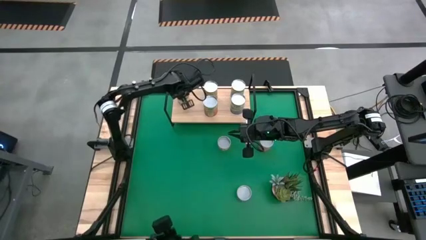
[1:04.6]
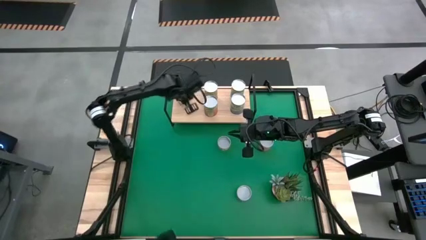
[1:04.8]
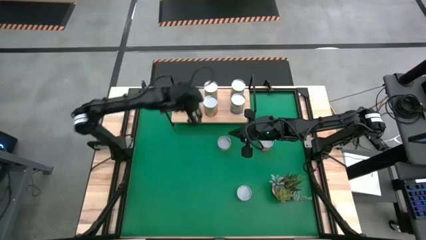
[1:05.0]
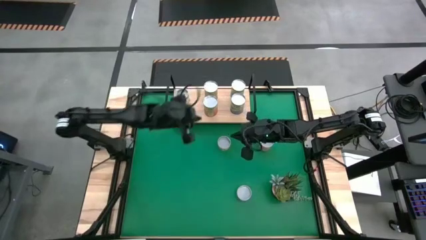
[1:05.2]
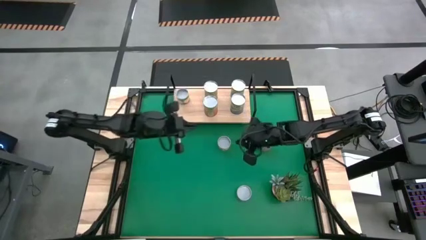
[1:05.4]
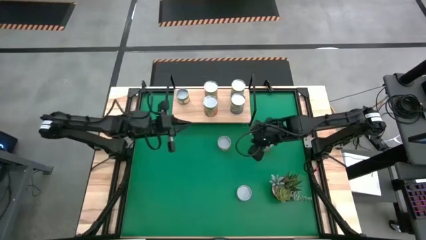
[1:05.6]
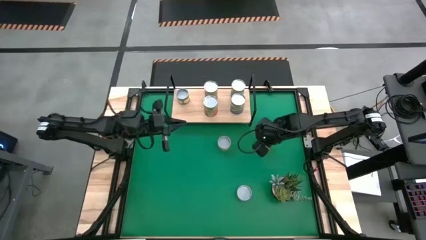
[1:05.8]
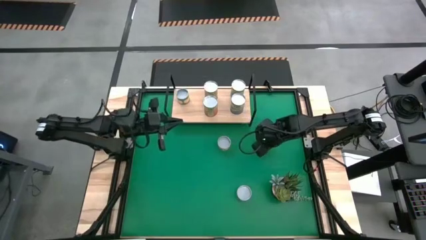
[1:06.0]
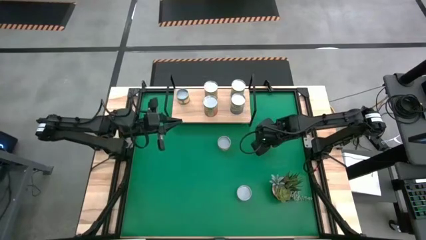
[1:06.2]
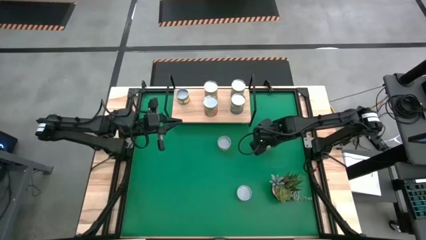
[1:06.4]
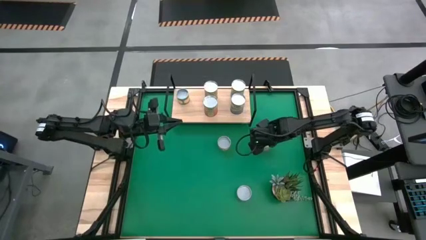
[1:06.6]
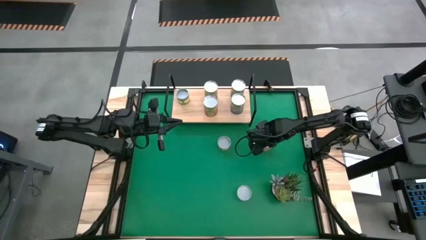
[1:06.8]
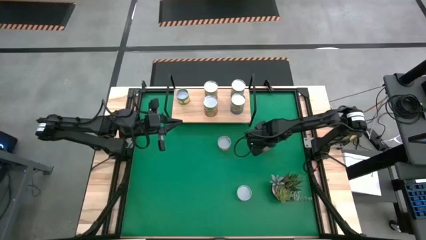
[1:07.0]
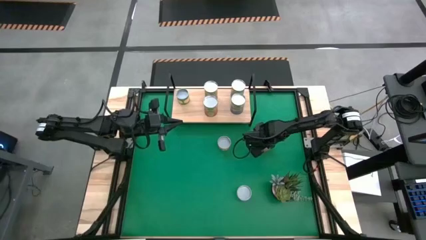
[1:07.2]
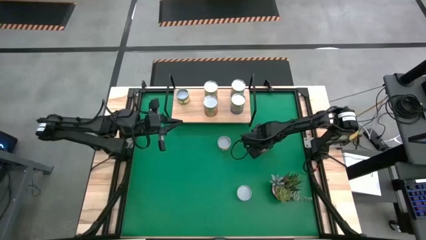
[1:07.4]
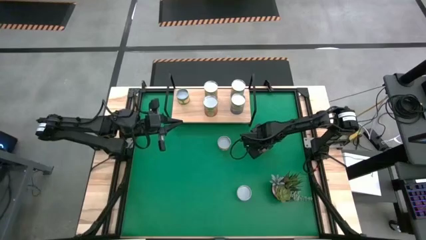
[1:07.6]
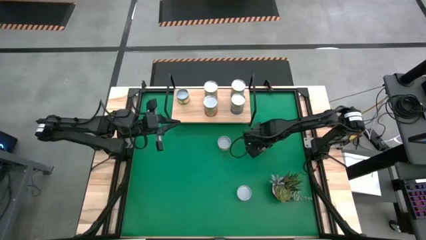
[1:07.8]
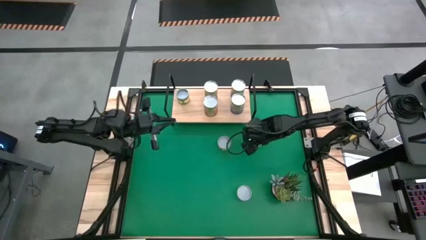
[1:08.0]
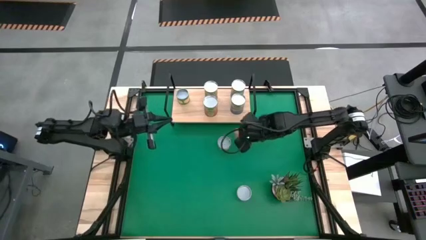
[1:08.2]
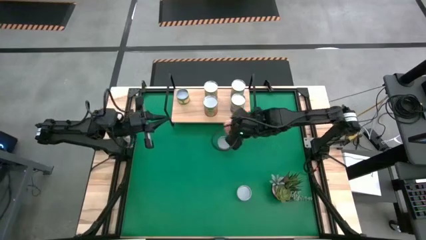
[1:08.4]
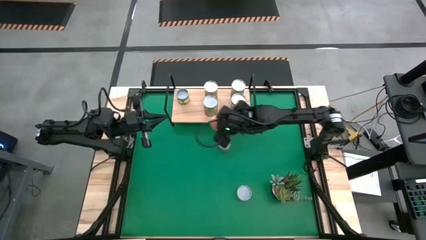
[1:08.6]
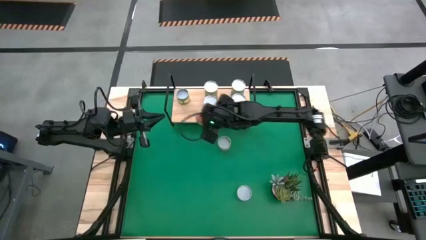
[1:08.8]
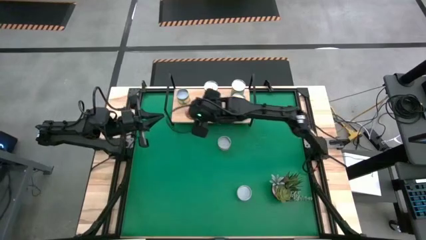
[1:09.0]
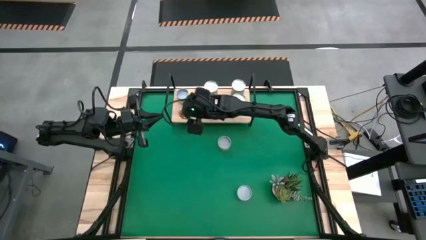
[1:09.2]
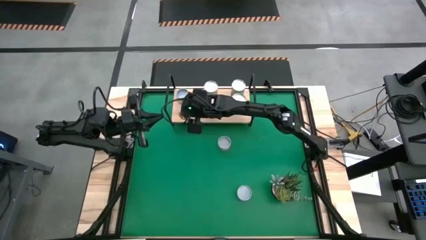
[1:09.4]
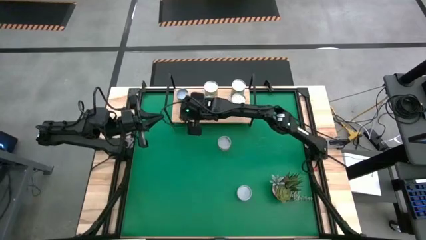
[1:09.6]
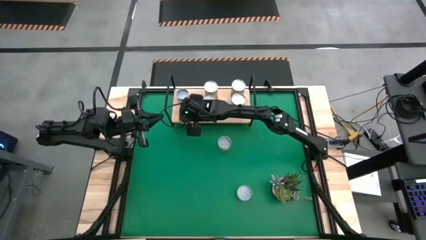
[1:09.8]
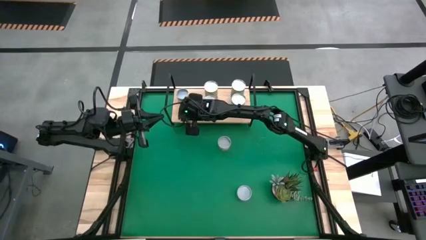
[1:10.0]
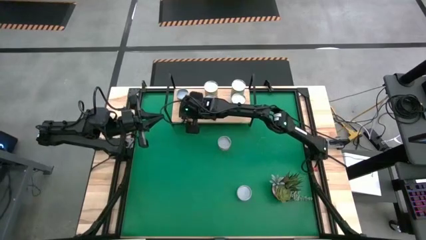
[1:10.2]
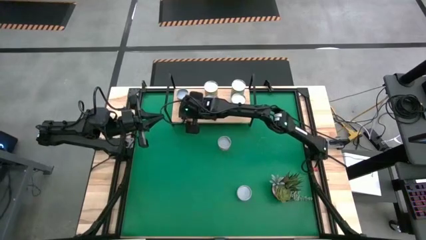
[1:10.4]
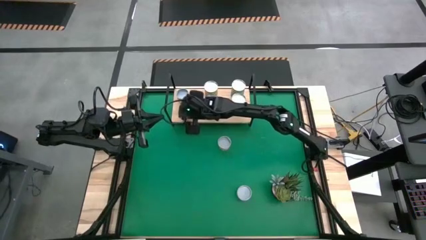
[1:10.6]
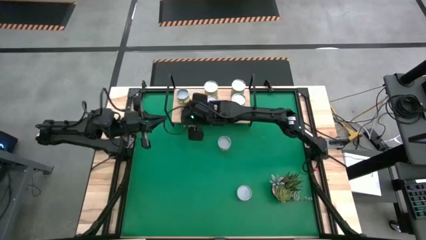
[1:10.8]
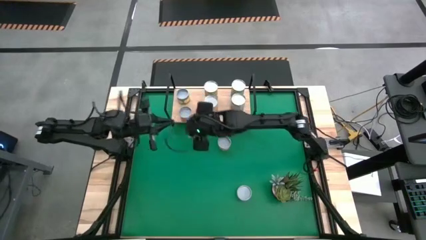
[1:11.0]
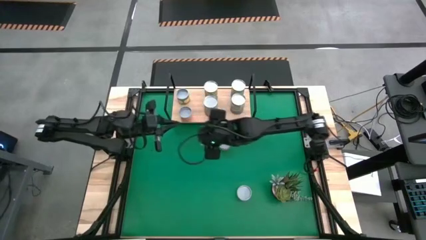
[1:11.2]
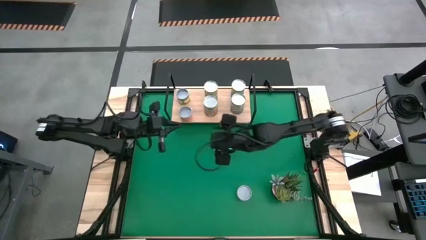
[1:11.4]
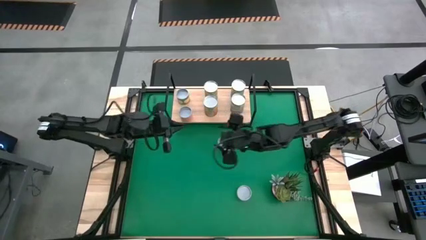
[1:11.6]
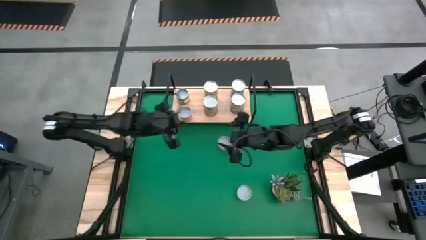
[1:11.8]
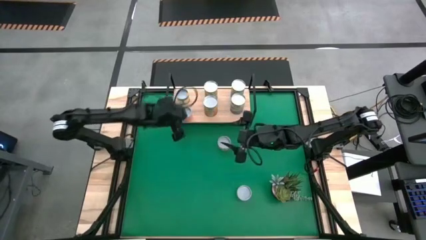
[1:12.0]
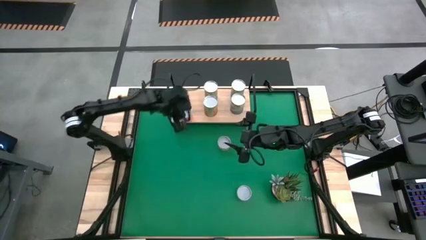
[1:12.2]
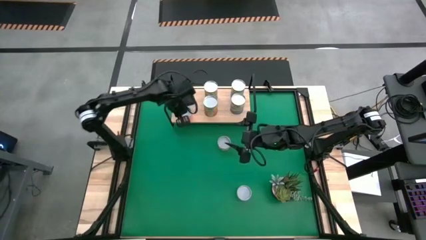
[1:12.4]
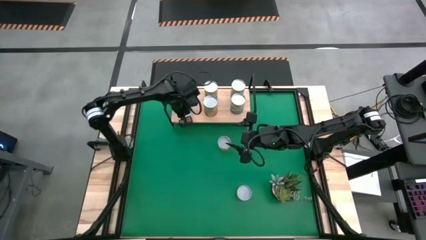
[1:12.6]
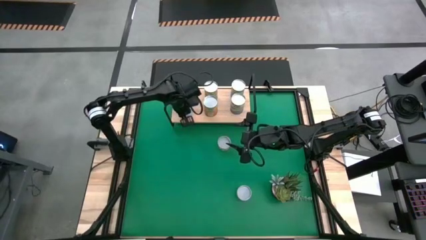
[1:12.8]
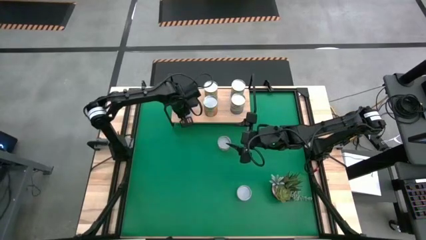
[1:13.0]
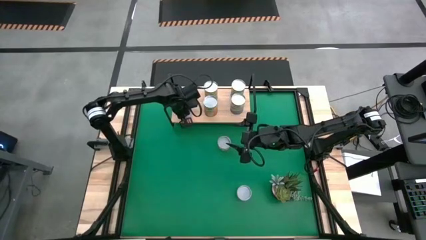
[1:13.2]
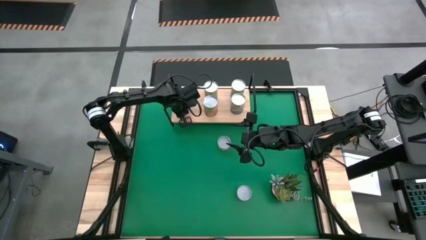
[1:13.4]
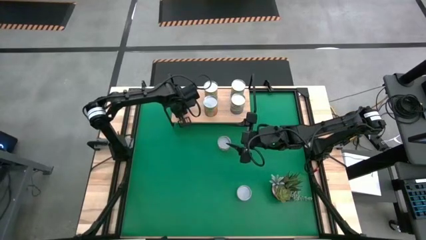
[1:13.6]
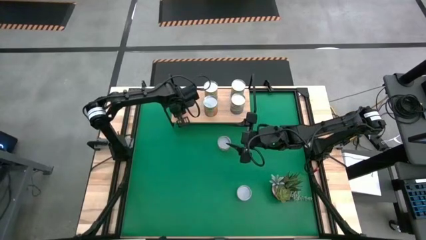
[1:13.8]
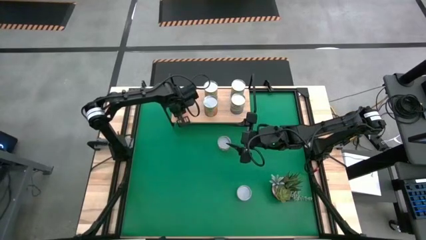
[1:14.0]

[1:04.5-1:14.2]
Task: Pick and place cans onto a shelf
Put the canned meat balls on the shelf

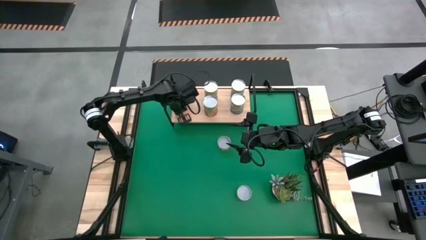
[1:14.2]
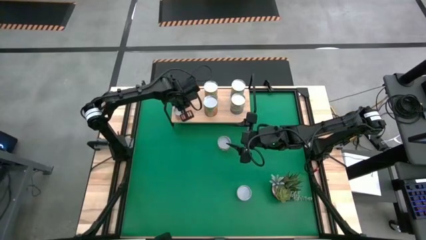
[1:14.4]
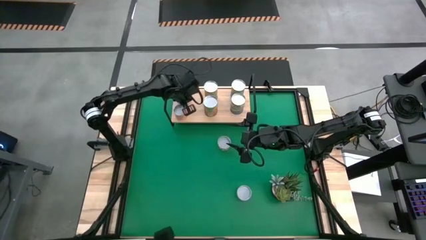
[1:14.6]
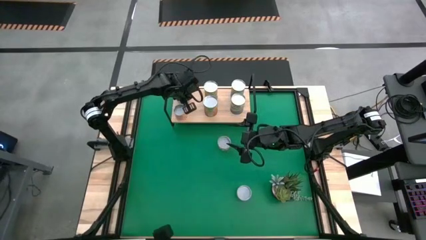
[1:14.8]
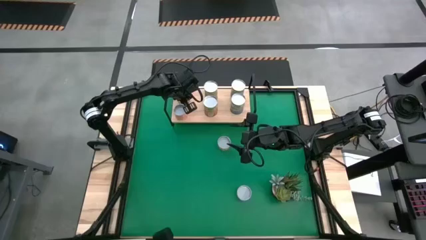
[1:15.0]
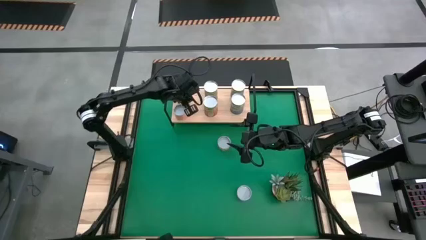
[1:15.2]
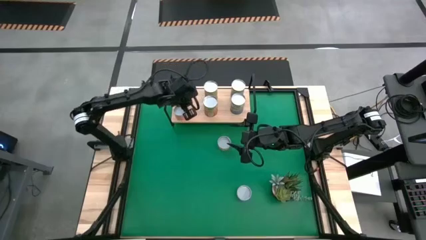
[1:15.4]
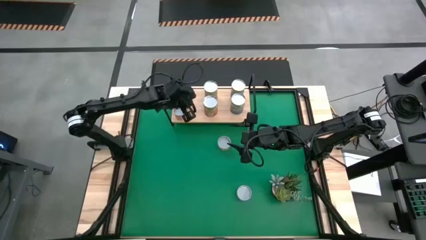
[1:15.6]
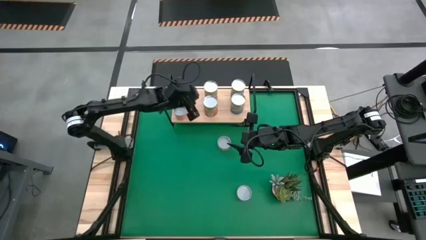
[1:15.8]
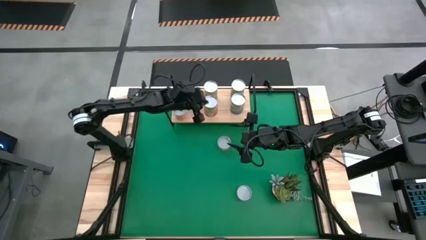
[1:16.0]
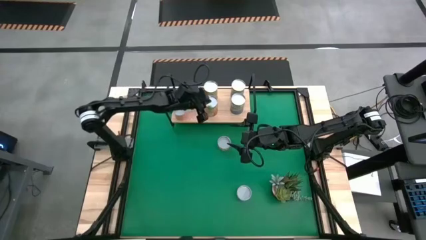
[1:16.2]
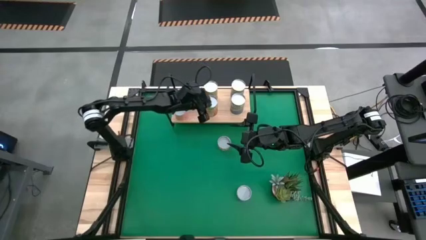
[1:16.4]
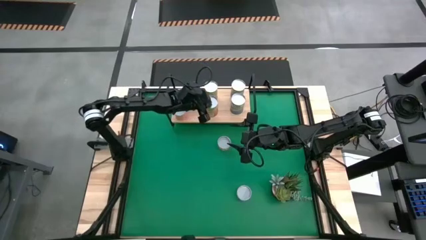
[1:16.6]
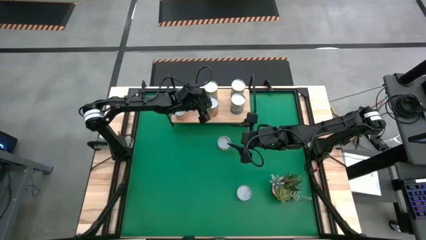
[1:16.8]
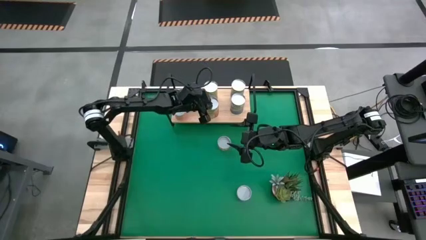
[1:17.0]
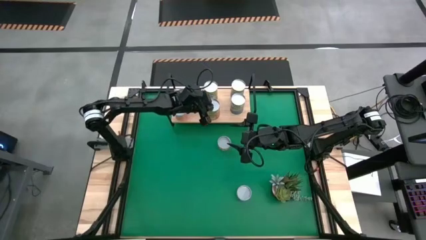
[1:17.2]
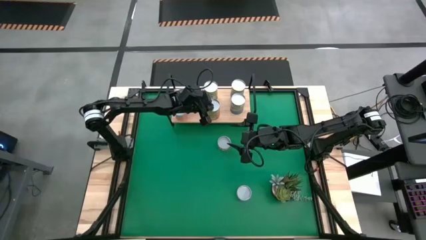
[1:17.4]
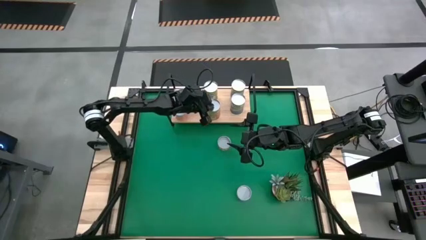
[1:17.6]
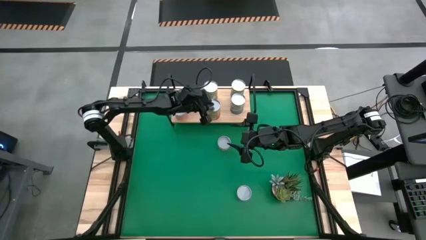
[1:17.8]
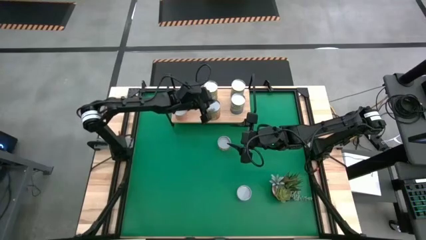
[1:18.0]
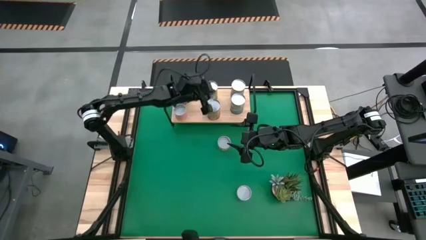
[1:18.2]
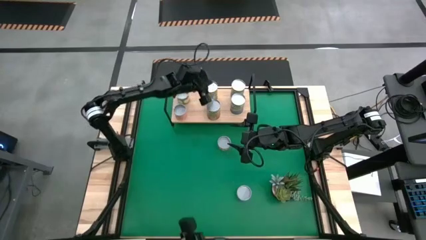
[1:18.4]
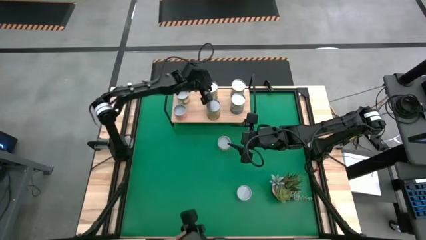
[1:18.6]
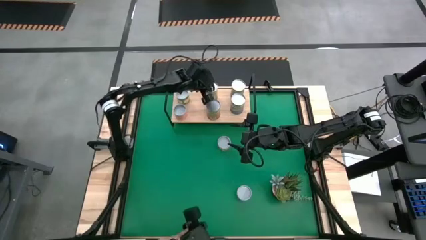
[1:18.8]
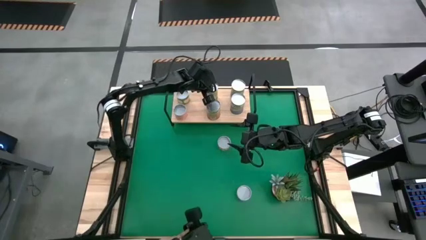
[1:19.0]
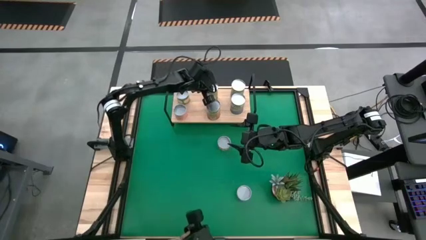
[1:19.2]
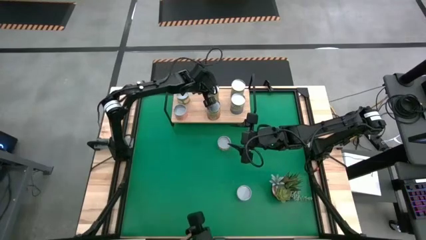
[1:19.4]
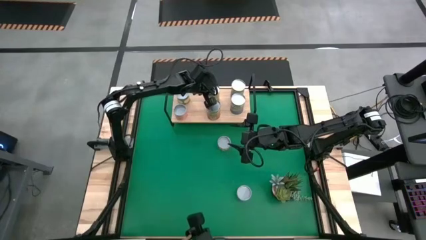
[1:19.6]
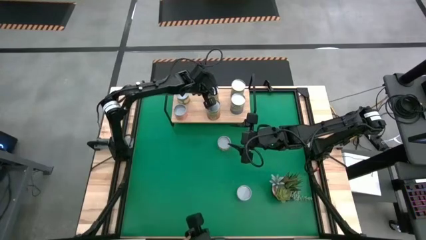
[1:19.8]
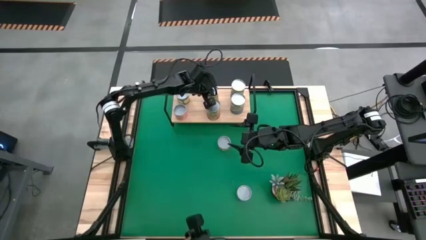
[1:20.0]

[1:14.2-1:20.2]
Adjust the canned goods on the shelf
